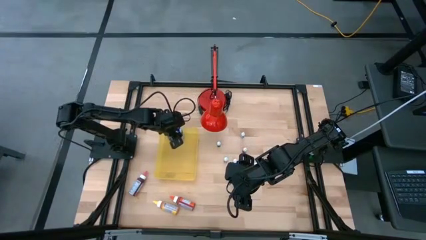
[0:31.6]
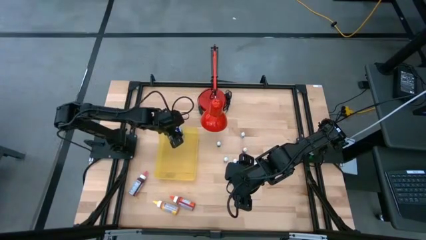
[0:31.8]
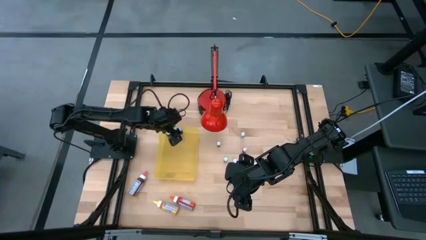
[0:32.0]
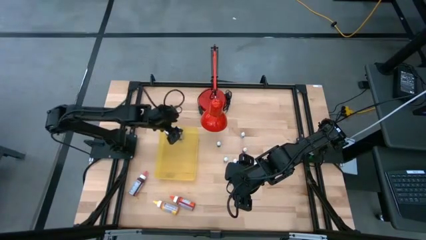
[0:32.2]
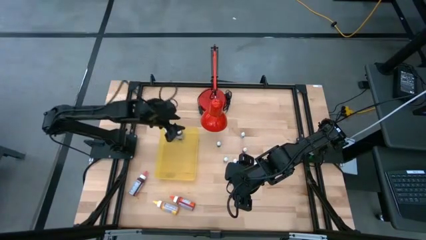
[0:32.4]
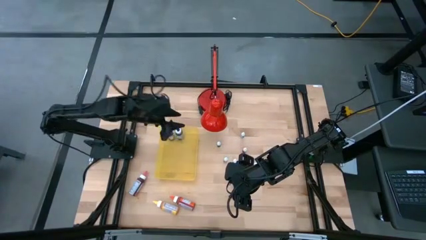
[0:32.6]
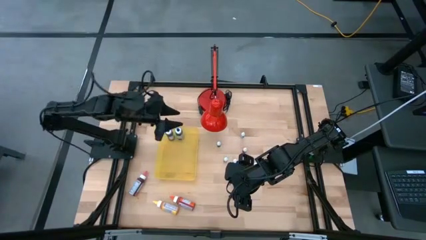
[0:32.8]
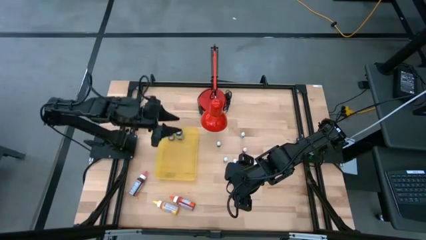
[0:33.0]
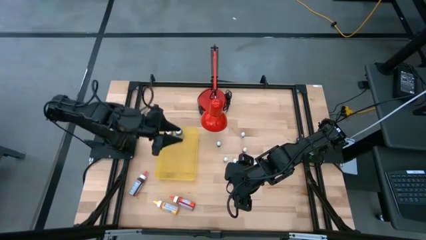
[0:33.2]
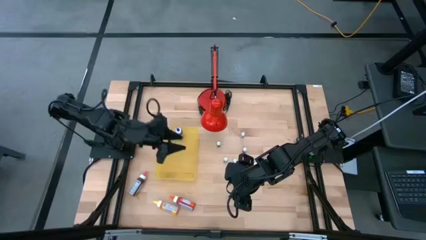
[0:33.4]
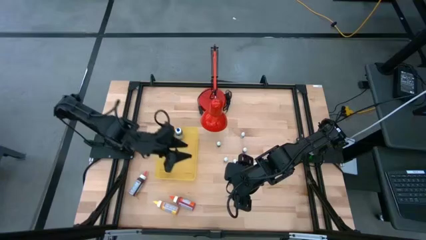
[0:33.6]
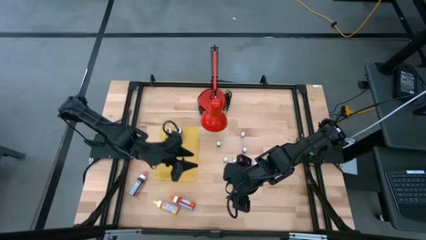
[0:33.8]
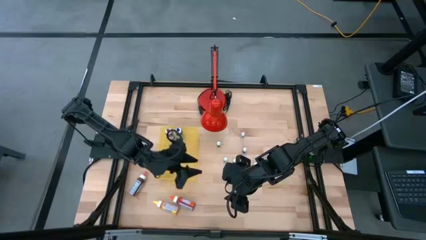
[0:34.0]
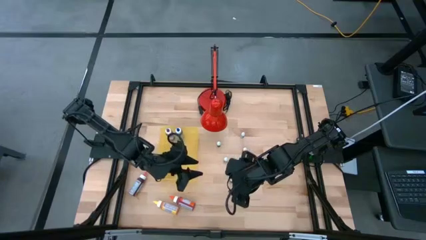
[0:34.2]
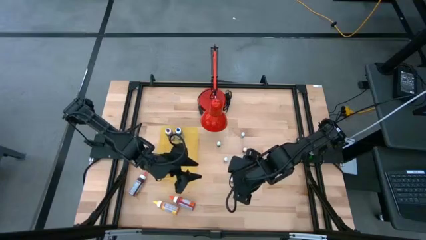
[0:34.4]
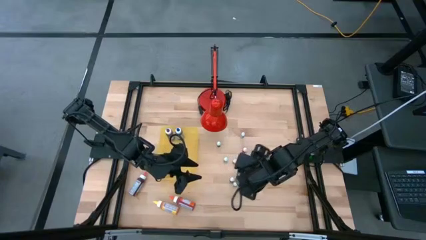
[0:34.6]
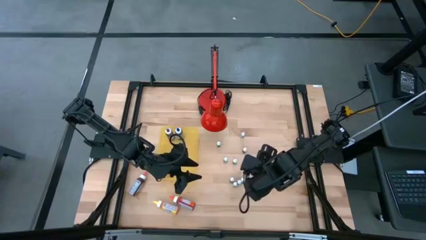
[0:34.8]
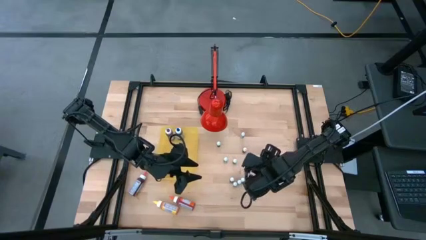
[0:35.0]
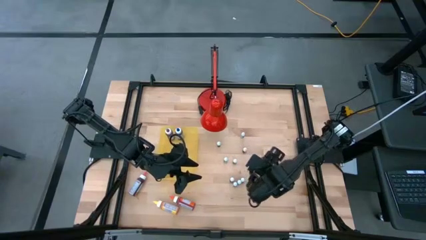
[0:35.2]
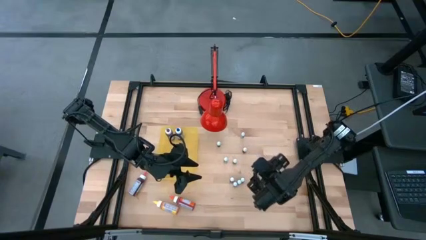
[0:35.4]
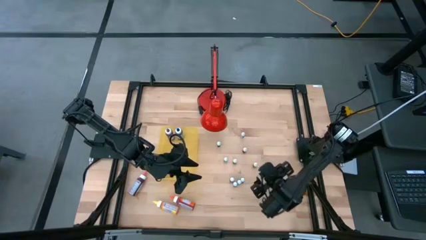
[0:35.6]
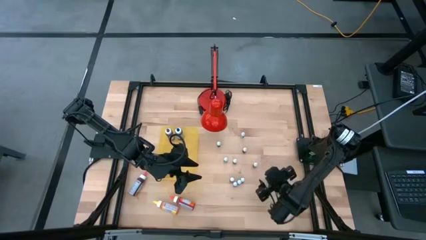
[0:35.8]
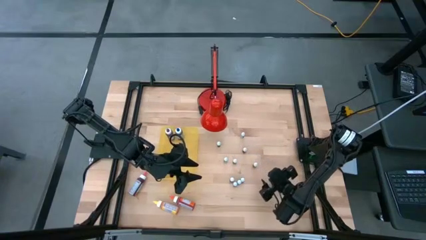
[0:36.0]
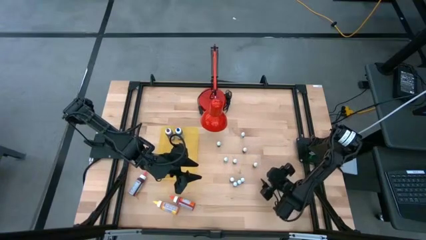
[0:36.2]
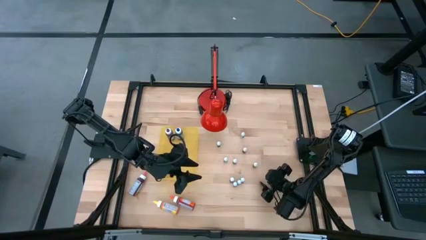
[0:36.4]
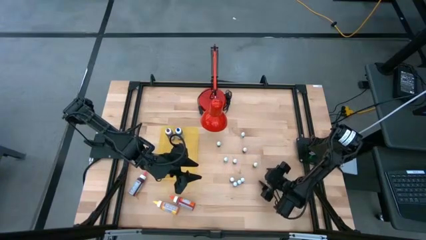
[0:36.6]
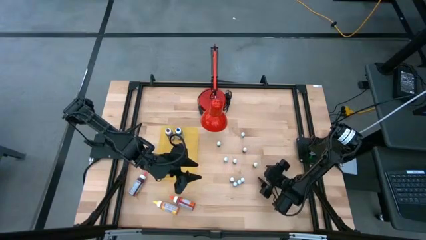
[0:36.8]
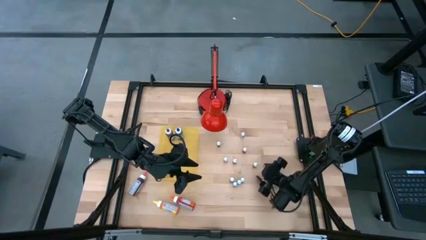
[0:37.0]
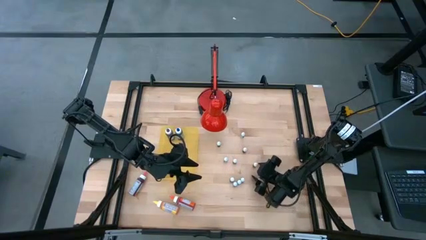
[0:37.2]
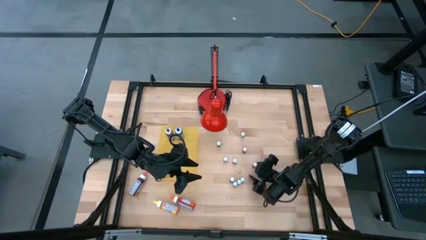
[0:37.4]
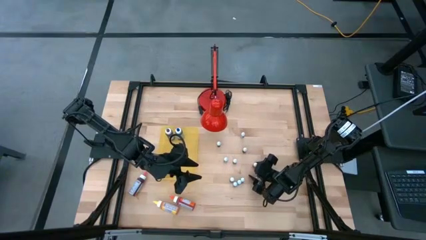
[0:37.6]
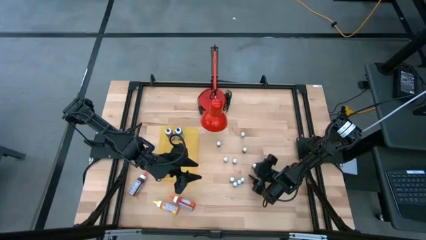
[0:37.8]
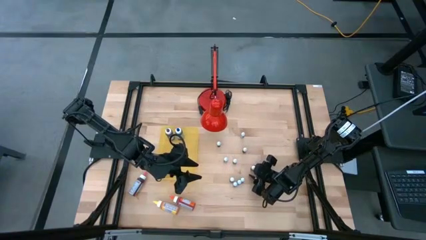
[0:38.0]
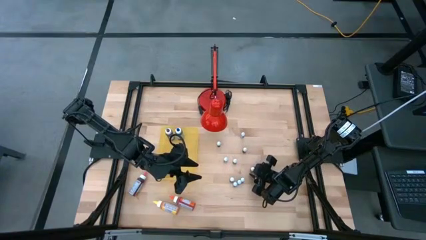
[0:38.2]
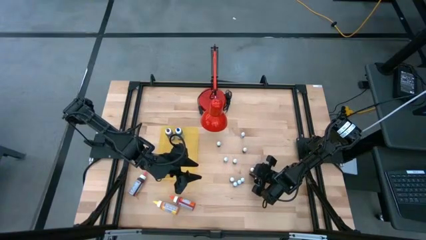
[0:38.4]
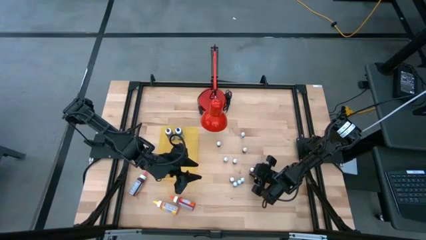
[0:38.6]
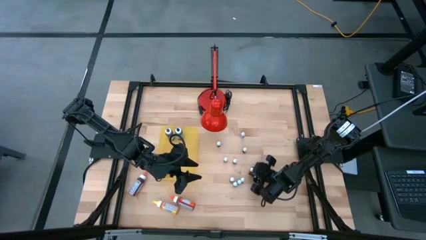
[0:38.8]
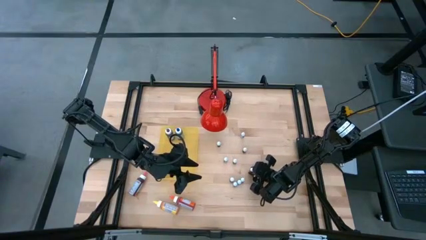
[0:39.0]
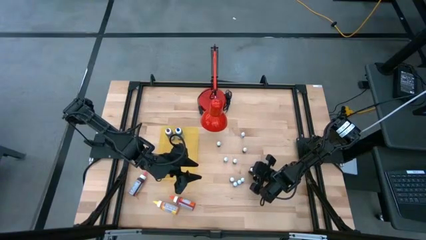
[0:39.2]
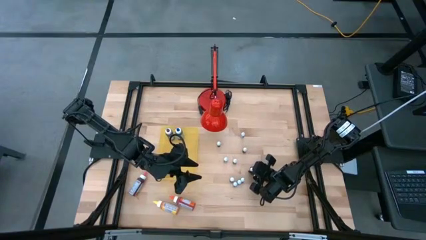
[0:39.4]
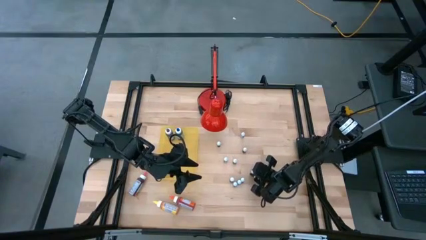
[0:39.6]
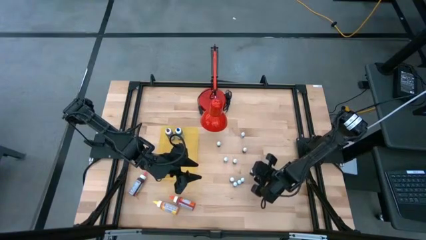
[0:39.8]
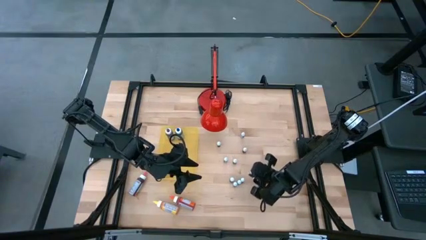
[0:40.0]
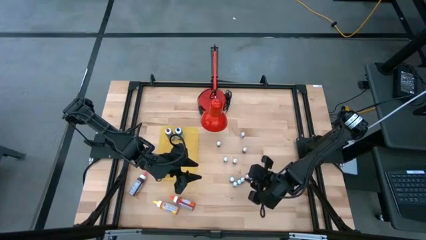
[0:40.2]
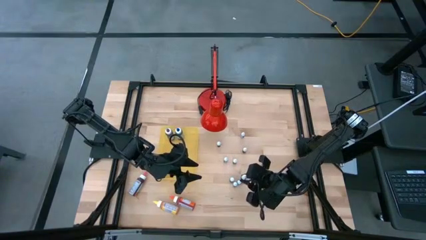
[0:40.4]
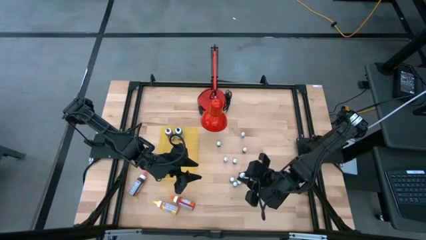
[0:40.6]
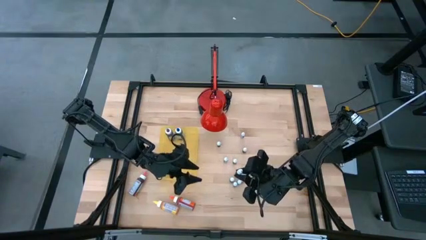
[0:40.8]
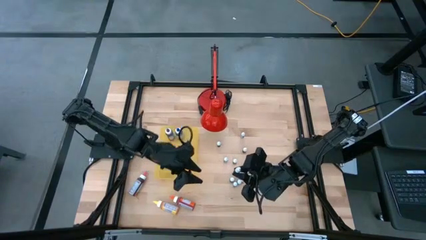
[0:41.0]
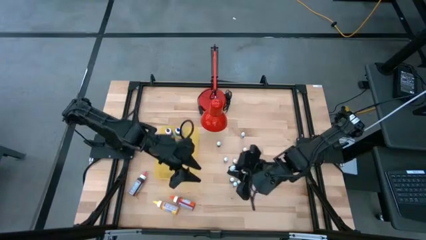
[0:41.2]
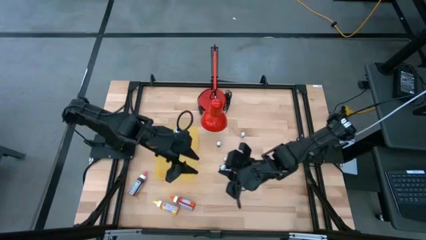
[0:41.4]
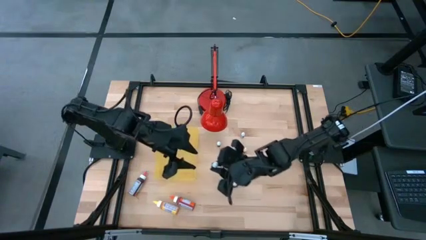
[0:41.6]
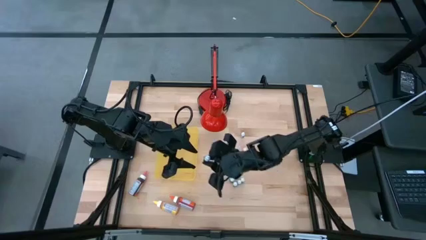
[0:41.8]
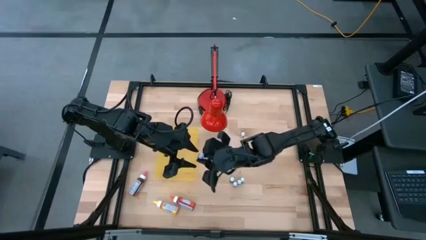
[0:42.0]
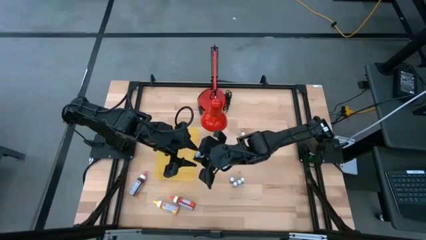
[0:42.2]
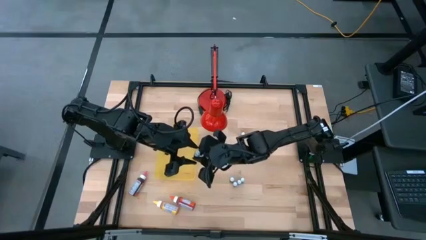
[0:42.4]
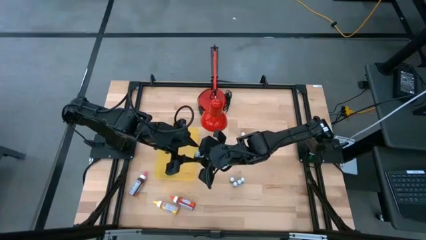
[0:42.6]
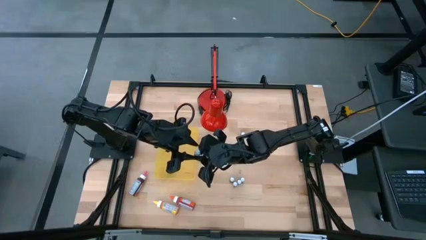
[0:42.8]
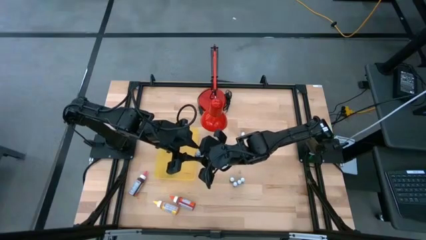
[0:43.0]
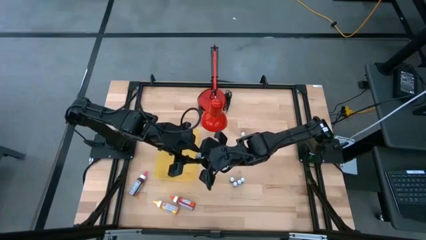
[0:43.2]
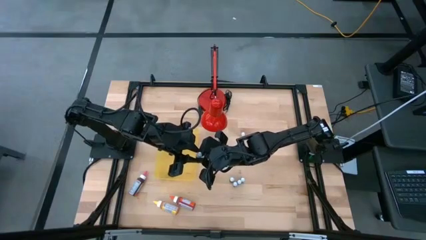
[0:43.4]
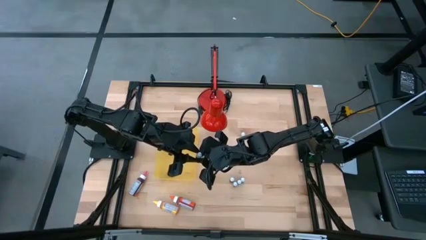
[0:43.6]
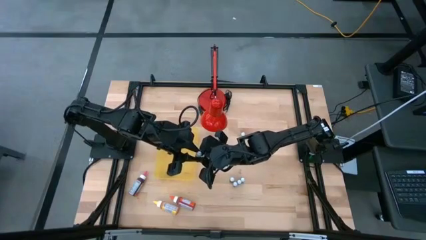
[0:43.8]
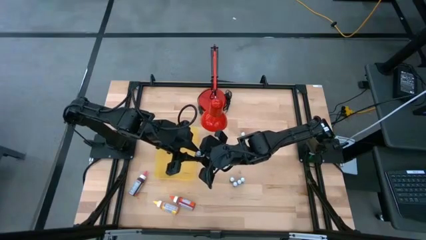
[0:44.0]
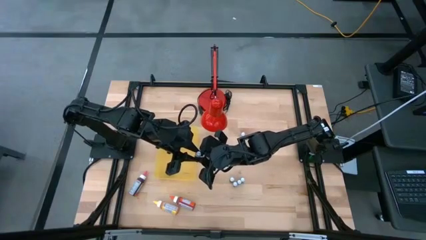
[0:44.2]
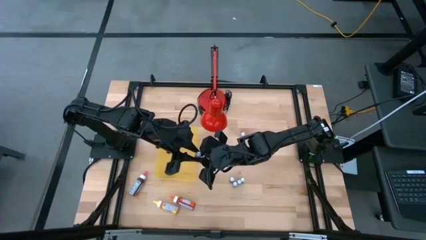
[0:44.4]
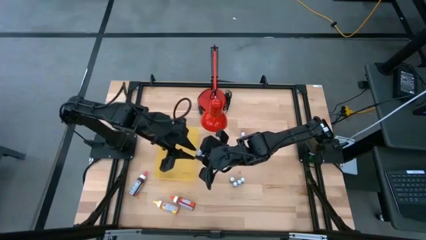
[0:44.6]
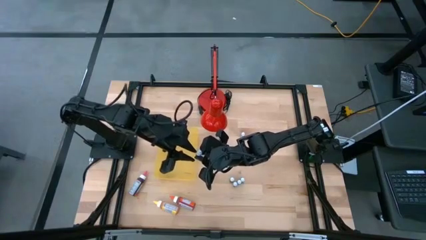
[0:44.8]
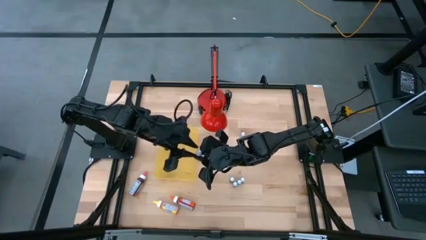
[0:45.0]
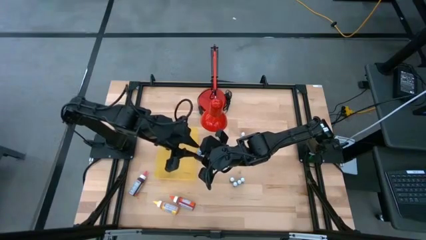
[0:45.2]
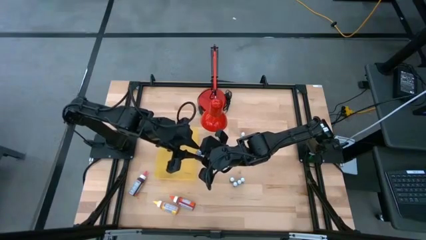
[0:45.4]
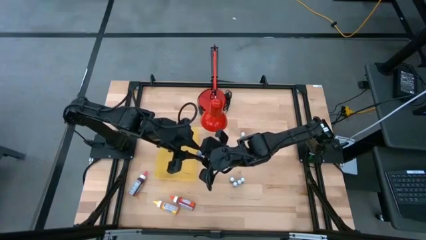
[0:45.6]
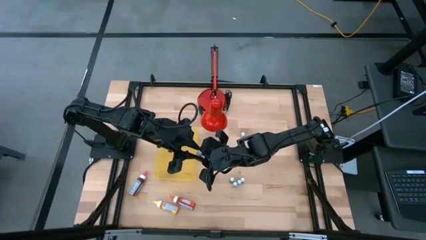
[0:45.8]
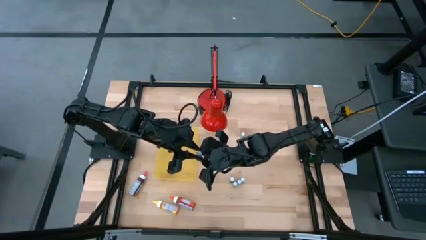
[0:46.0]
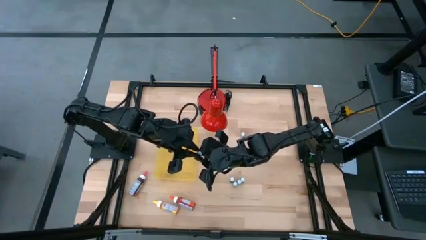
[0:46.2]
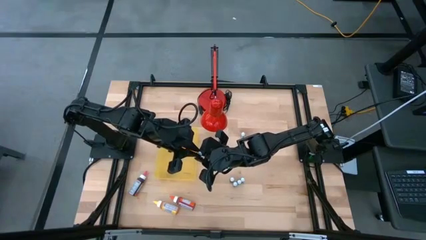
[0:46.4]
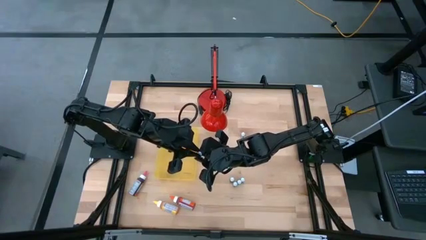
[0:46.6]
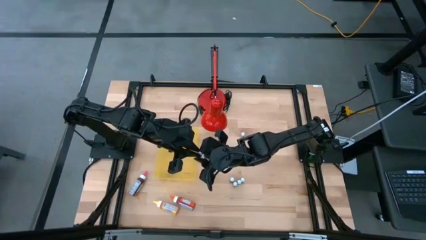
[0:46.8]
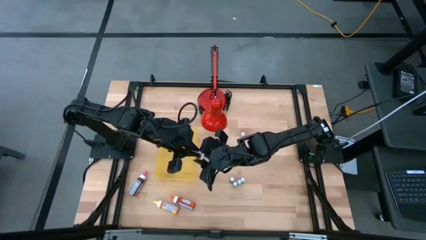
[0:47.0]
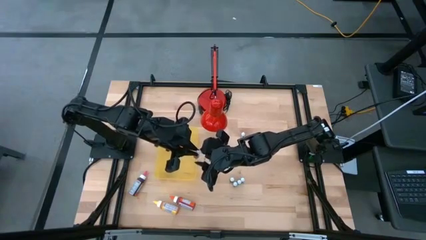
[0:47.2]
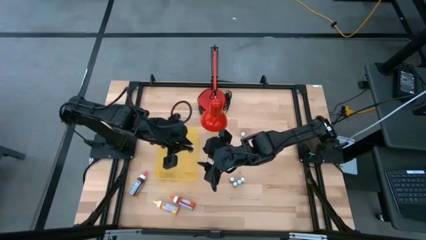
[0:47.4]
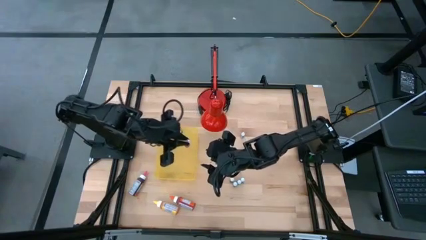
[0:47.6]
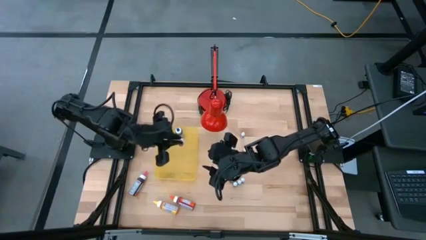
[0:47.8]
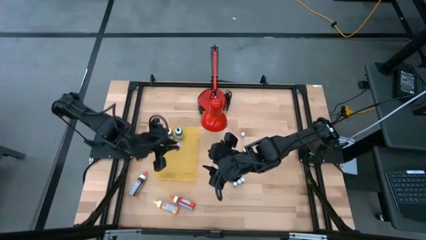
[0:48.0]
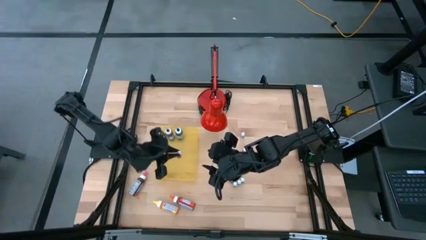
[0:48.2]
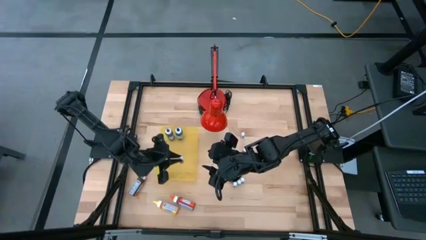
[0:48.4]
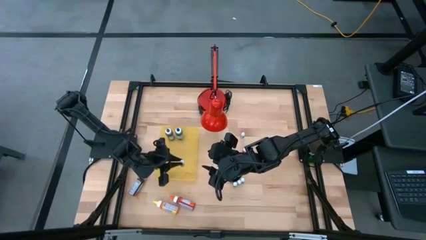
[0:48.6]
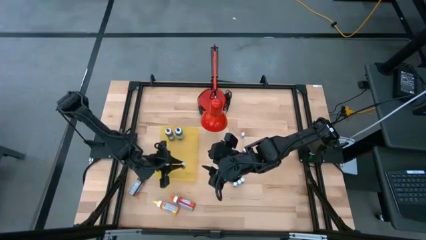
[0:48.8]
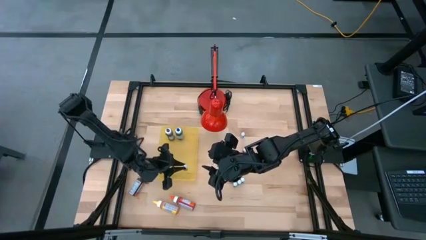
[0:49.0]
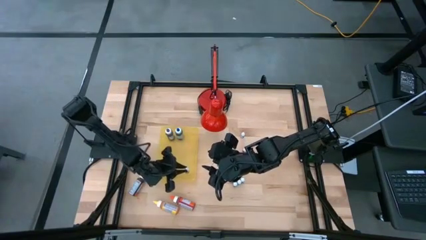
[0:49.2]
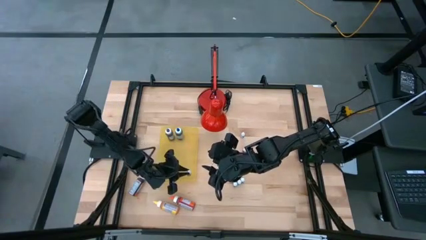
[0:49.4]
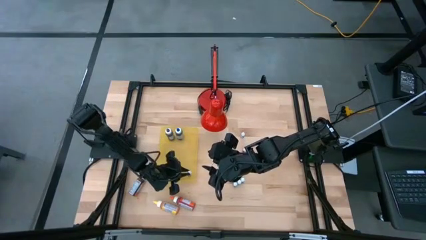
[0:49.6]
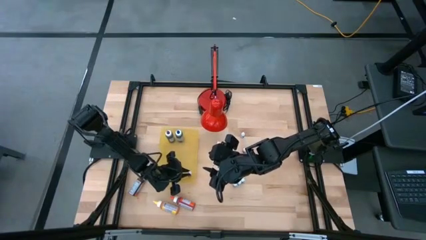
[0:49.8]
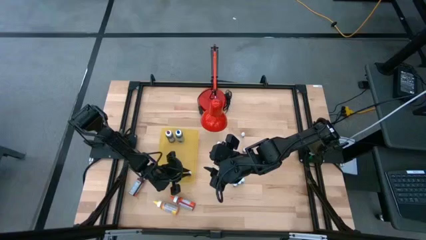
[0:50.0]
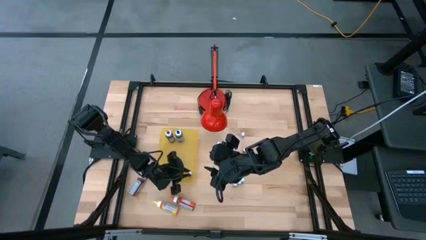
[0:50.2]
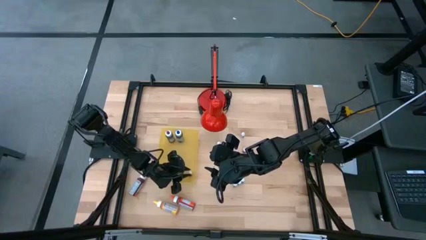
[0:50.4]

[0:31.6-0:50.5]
Task: Pick & Place food coloring
Put the right small pink food coloring bottle into the yellow bin
